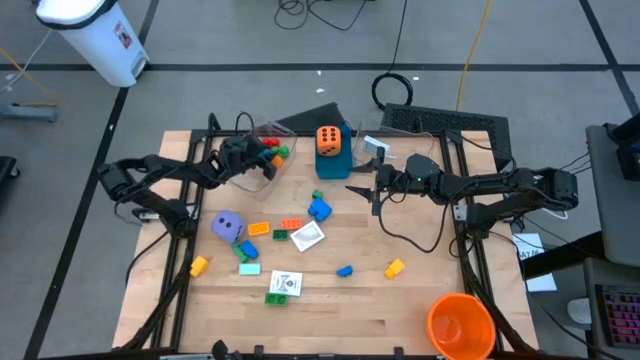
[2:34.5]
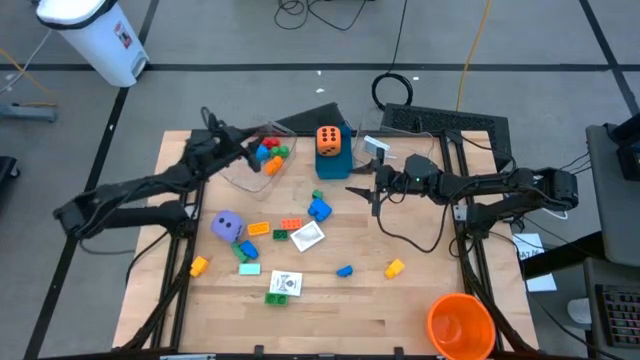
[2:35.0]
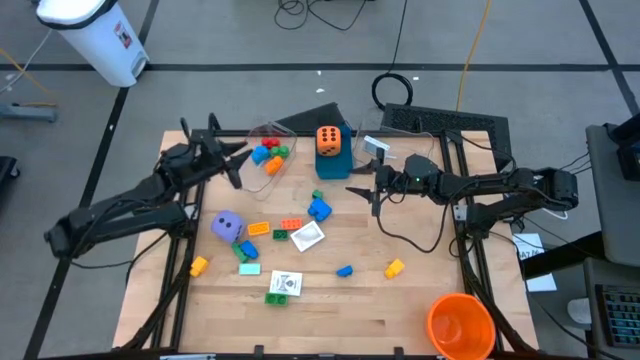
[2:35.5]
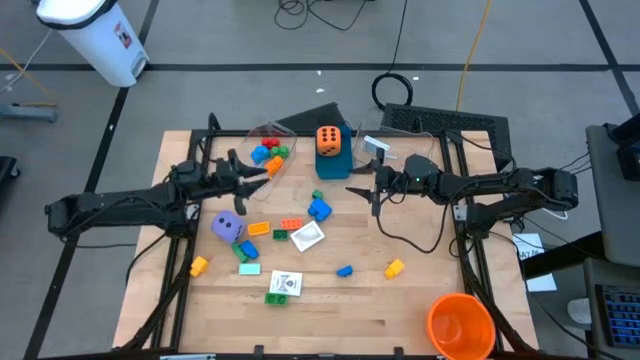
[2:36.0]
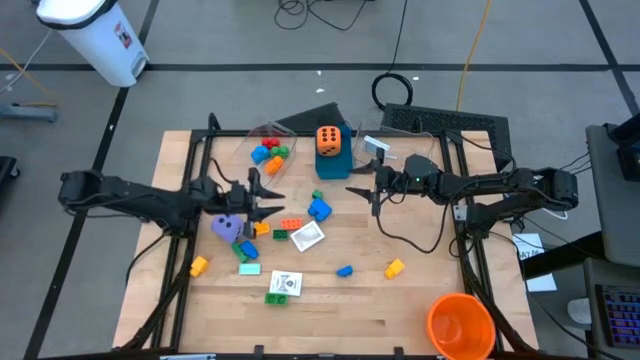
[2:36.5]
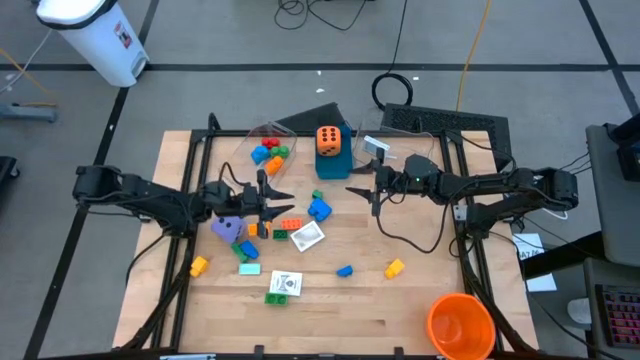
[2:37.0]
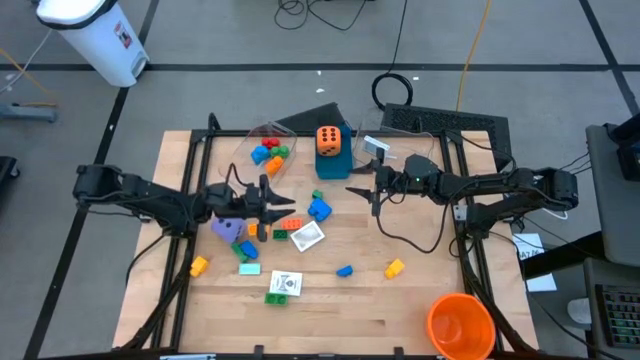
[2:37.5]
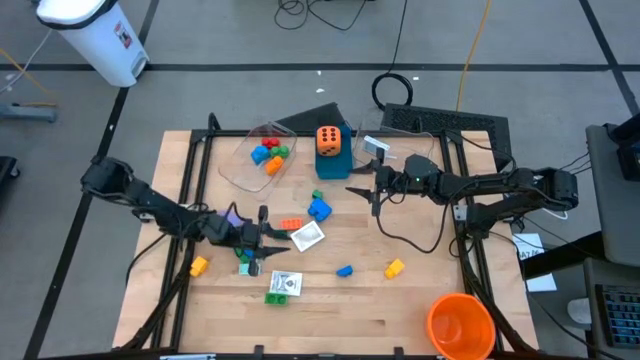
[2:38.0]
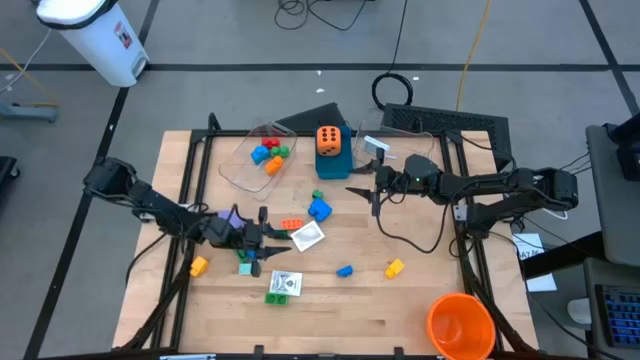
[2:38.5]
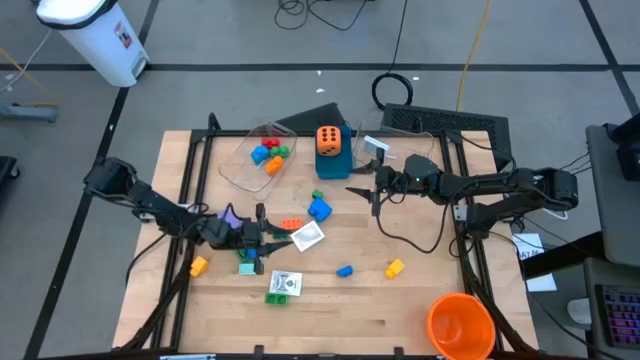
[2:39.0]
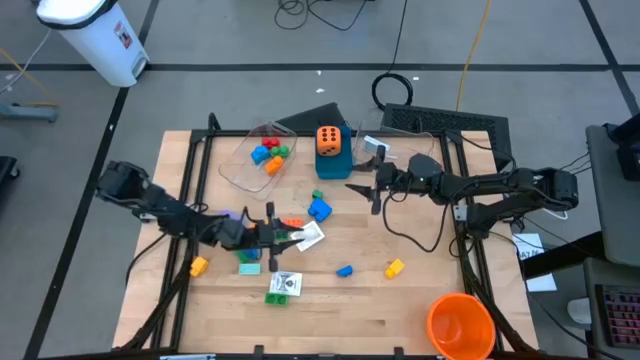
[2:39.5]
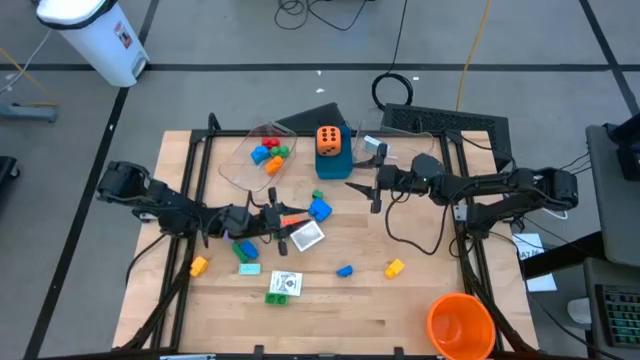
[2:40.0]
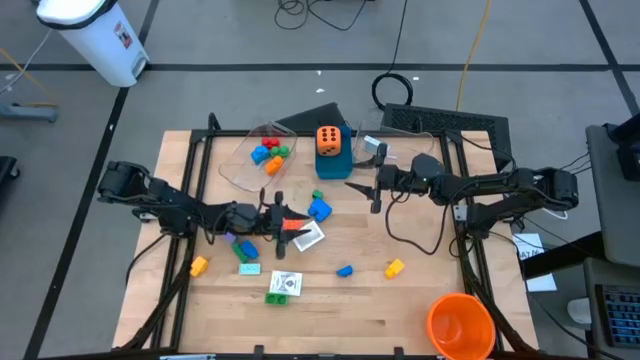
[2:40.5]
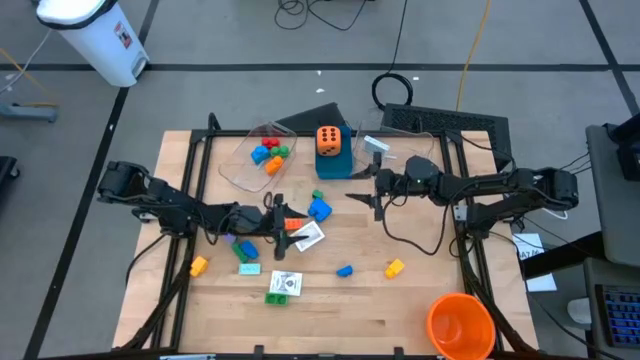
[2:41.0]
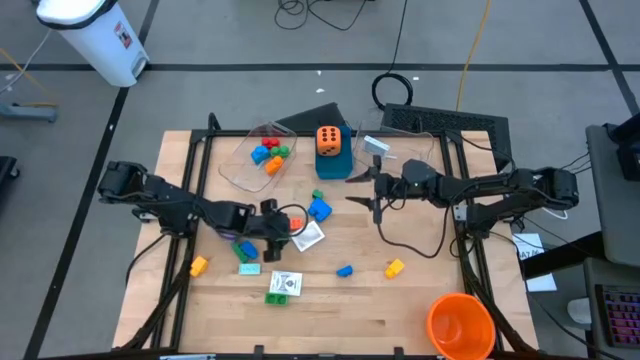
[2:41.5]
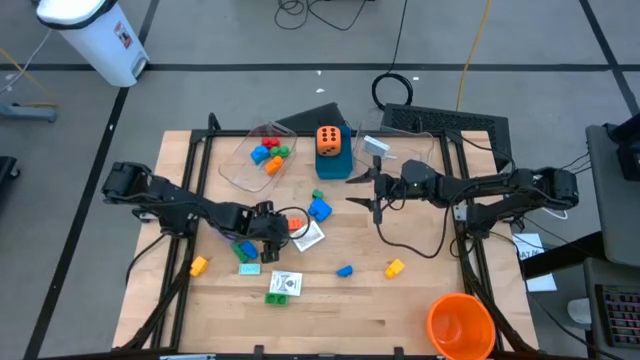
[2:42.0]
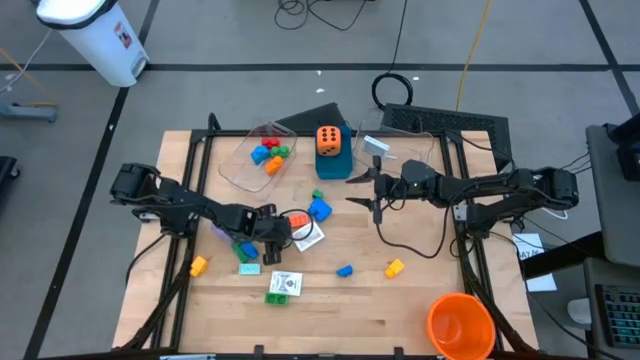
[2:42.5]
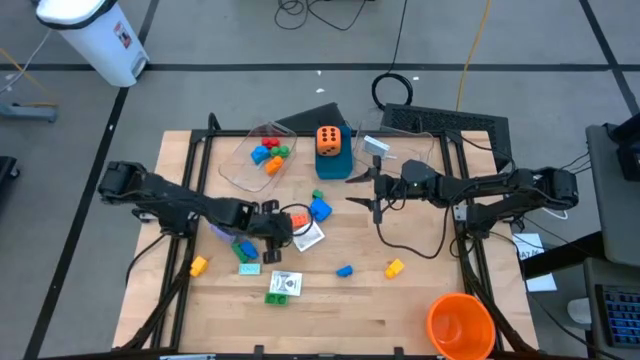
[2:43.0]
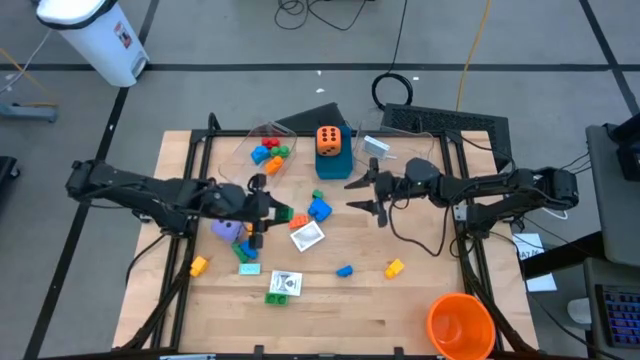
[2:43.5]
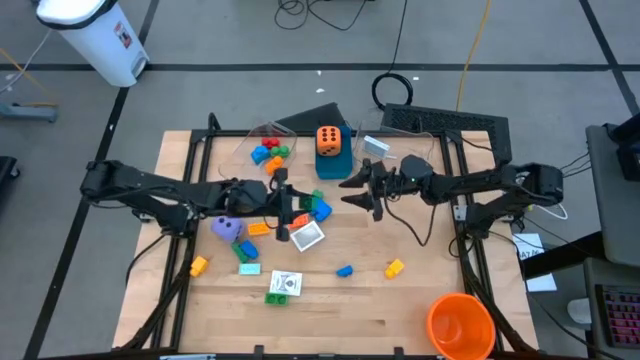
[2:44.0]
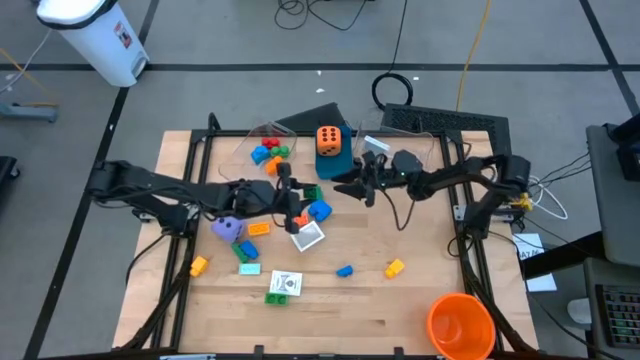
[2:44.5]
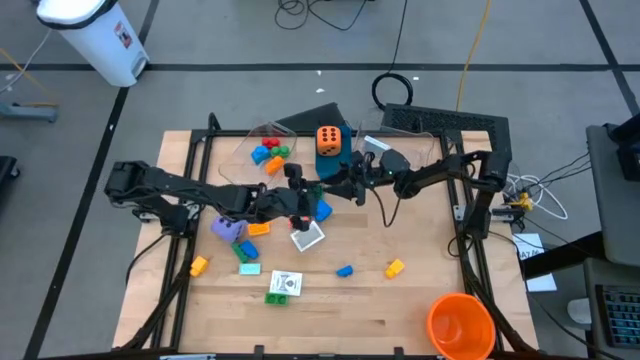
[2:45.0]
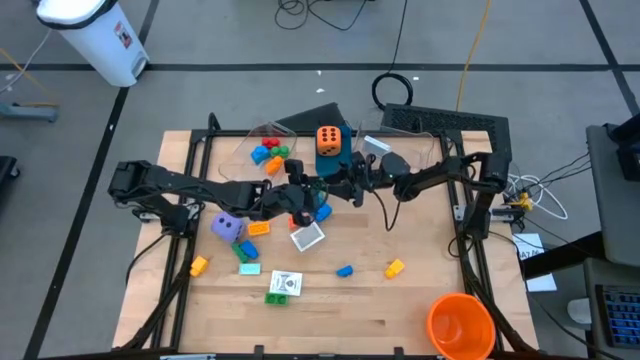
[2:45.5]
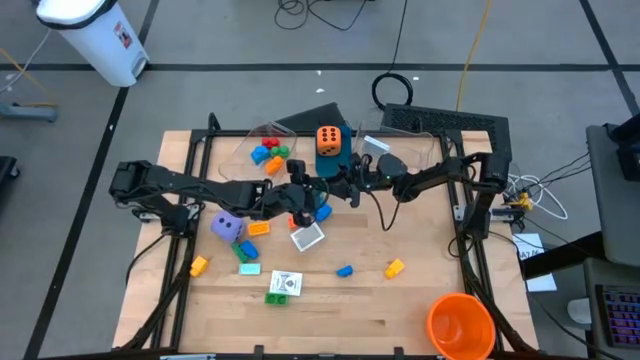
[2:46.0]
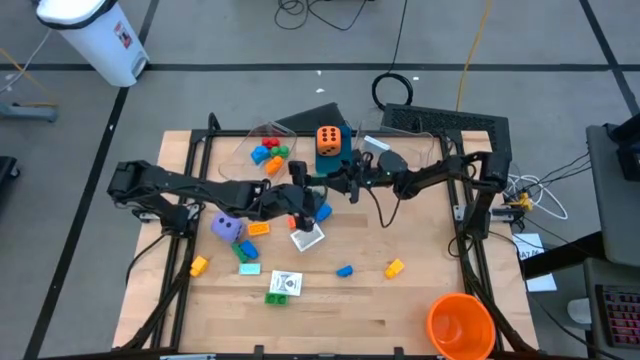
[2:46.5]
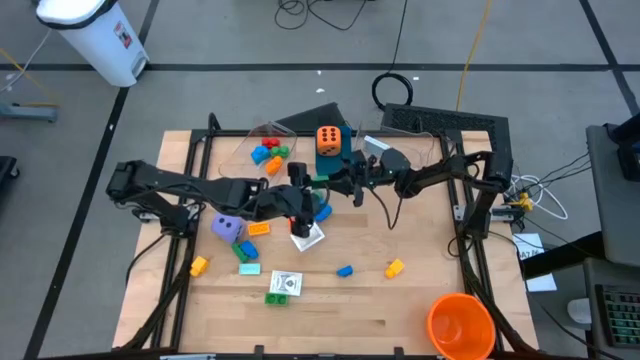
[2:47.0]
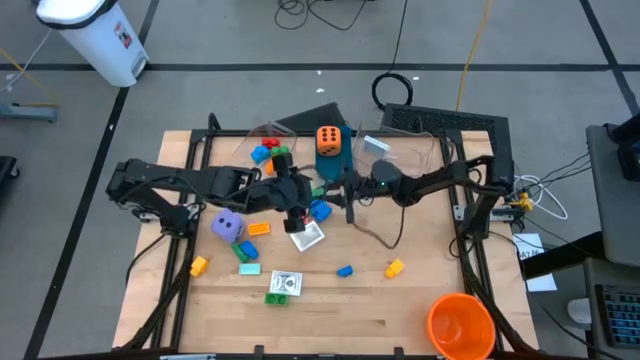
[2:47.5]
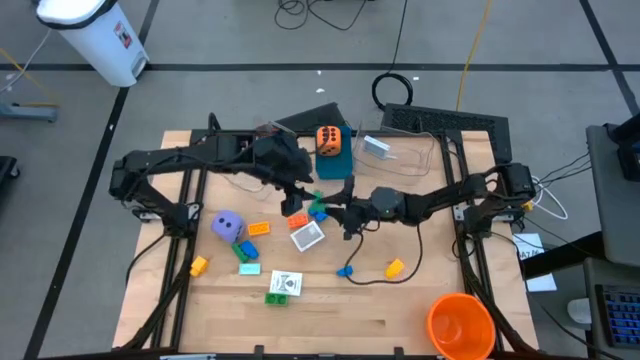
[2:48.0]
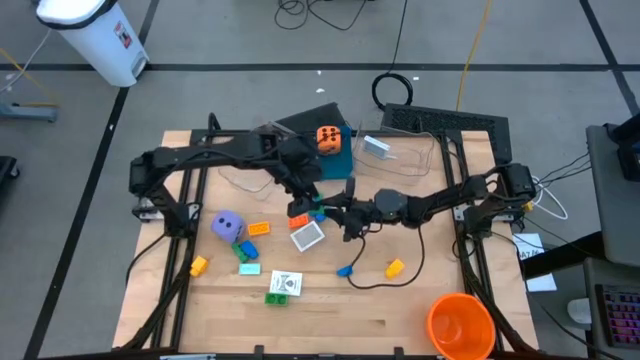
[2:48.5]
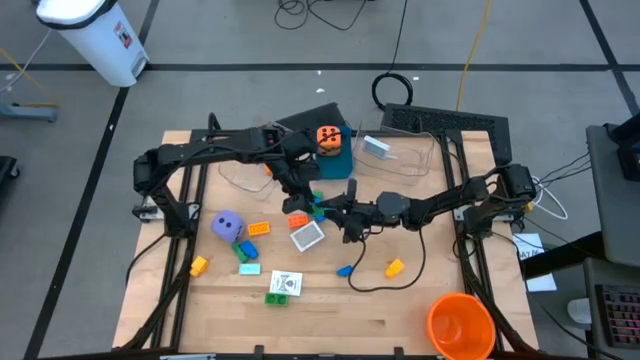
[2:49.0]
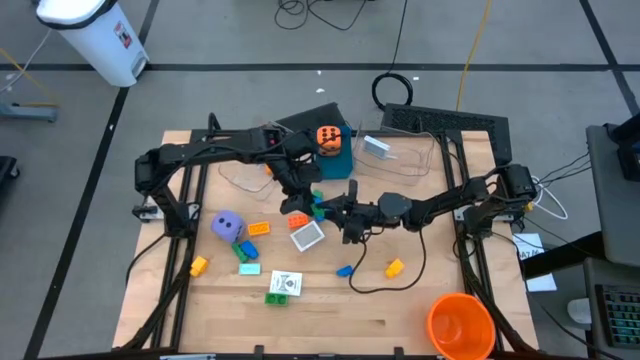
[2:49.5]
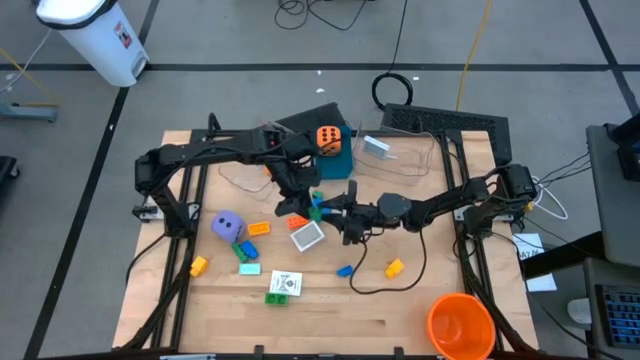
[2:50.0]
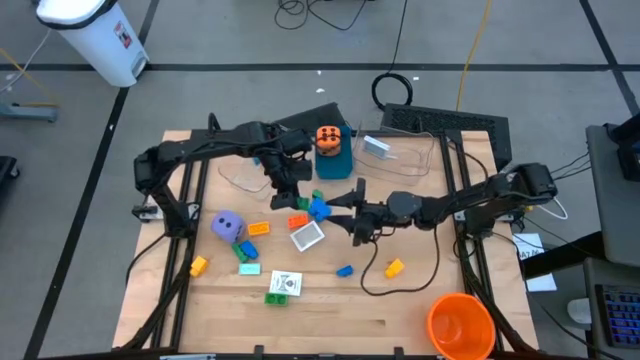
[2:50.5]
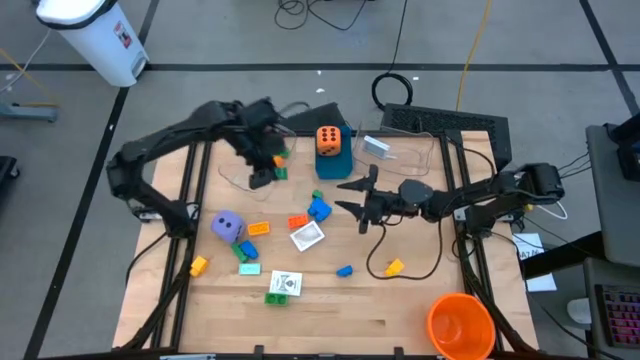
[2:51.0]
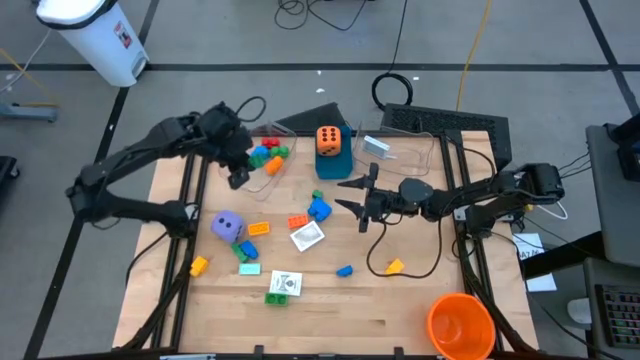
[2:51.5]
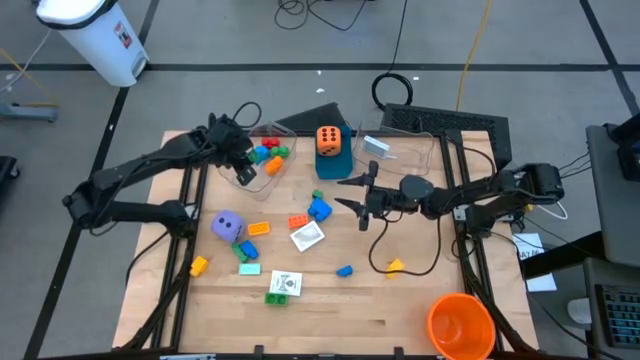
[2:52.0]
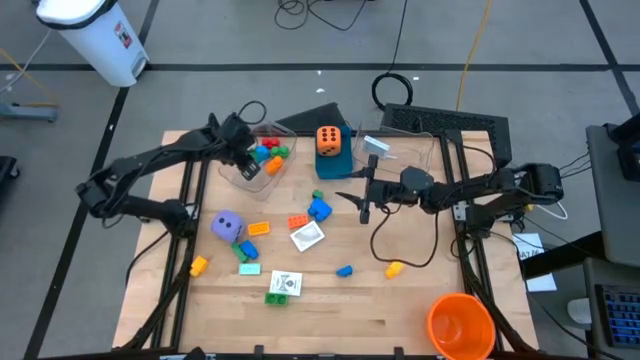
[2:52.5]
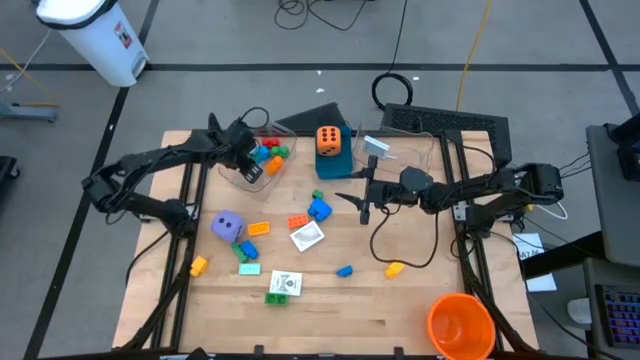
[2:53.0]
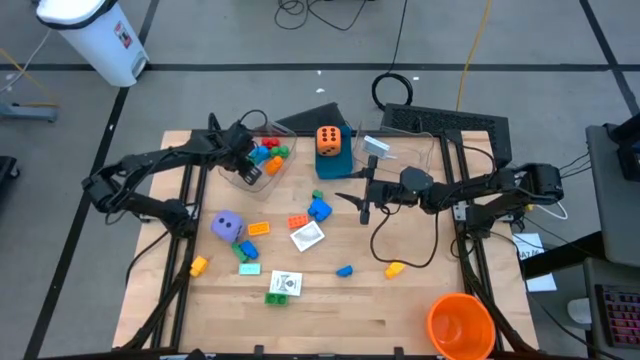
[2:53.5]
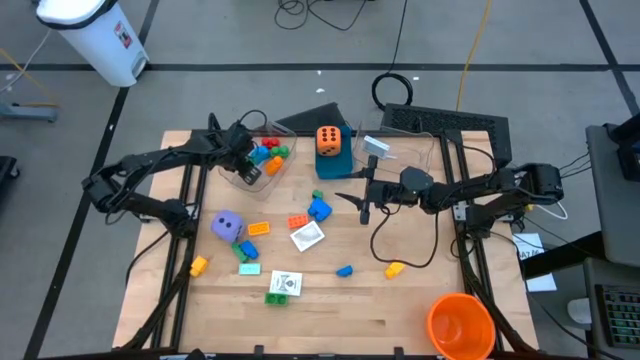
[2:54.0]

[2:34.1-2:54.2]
Task: Pick & Place Toys
Put the green game piece into the left transparent bin

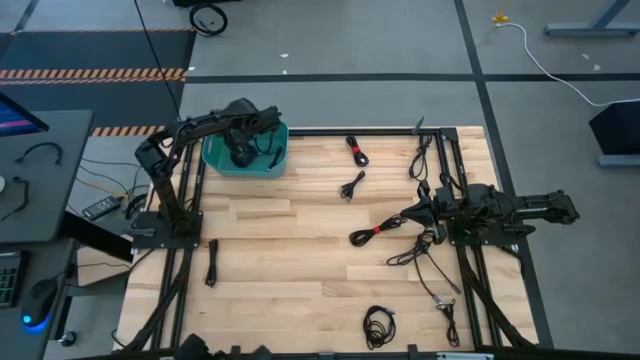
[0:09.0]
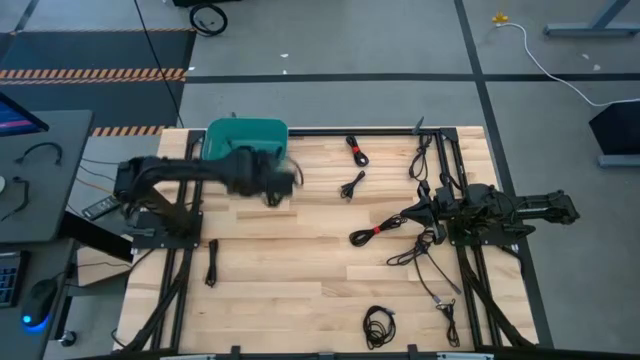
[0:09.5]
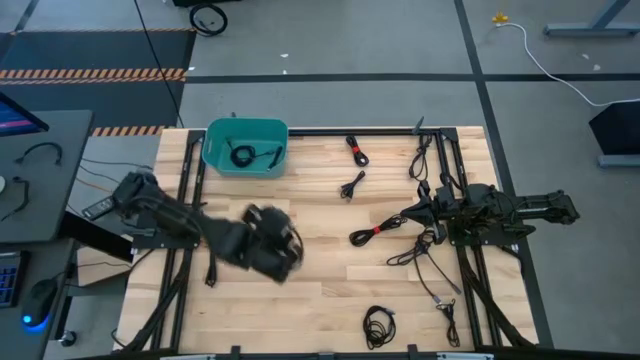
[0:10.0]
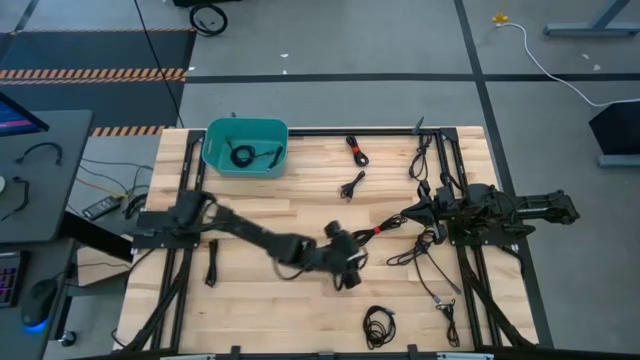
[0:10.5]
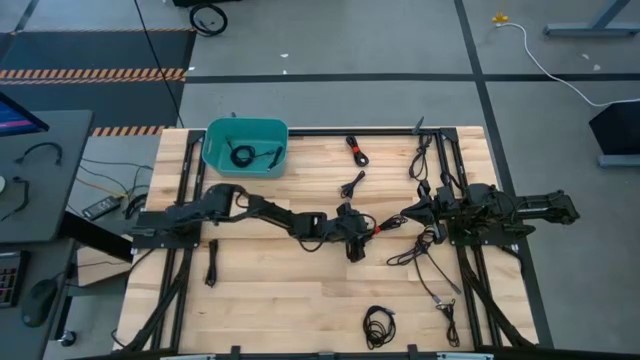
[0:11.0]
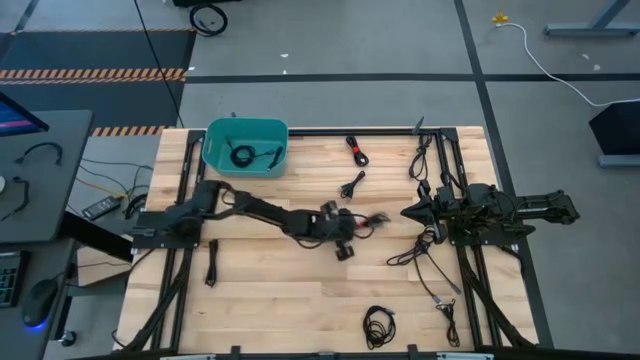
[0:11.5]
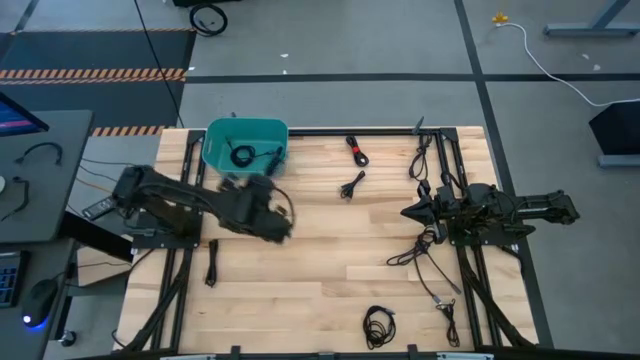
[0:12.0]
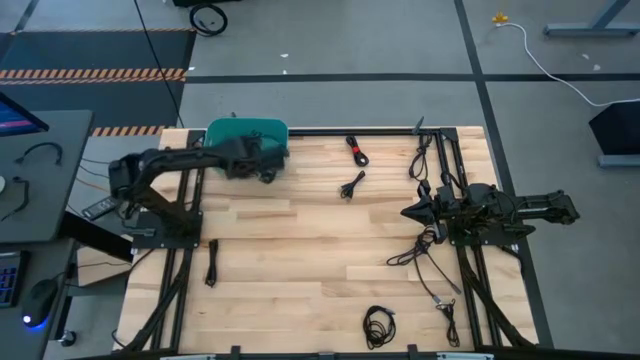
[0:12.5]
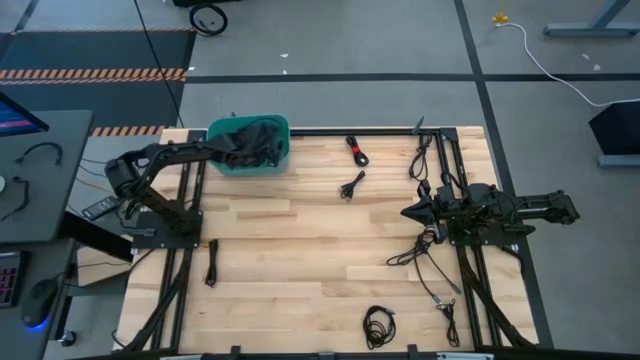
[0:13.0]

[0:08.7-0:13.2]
Task: Pick and place USB-C Cables
Put the black charger cable into the blue bin
